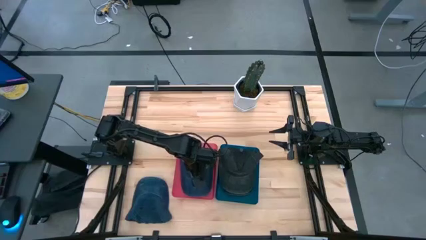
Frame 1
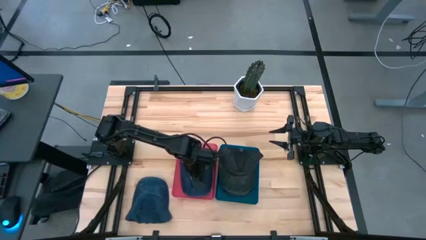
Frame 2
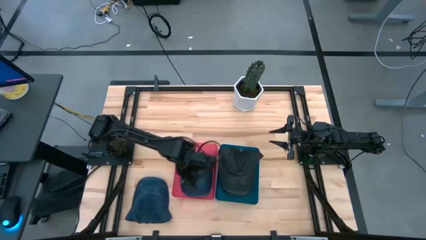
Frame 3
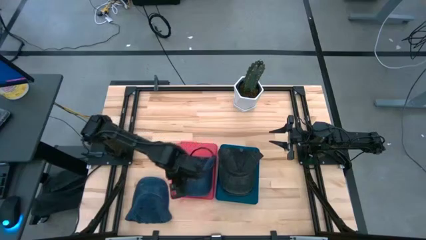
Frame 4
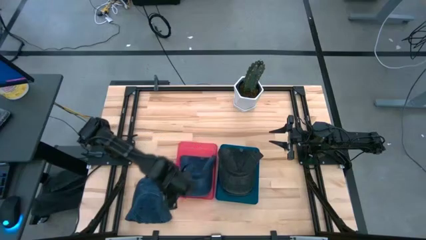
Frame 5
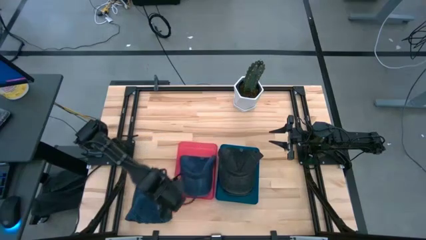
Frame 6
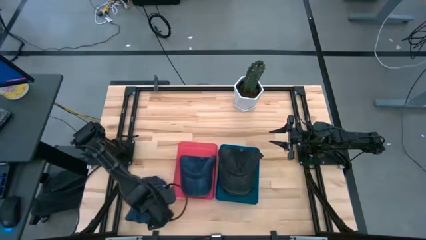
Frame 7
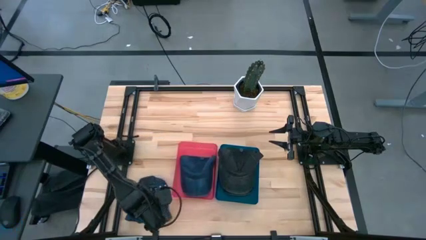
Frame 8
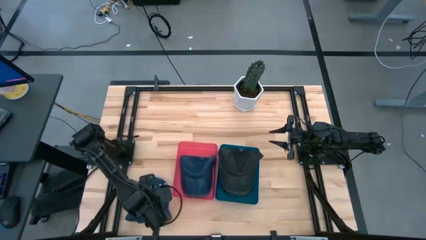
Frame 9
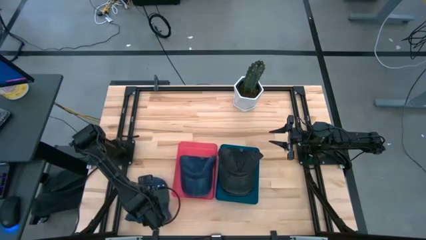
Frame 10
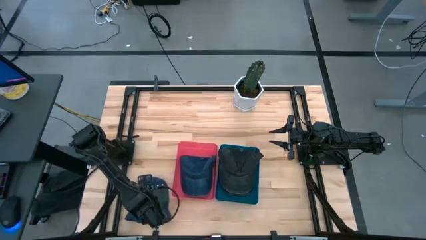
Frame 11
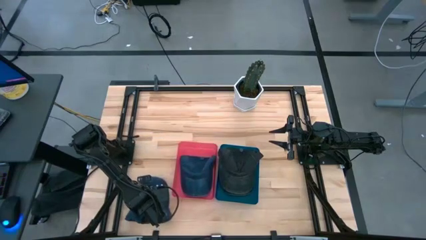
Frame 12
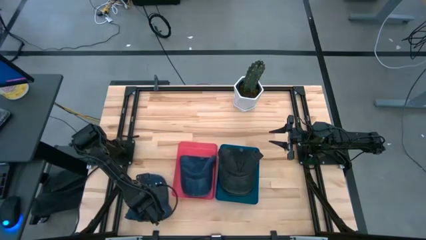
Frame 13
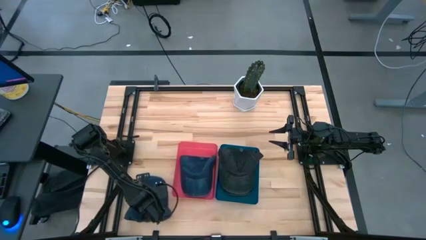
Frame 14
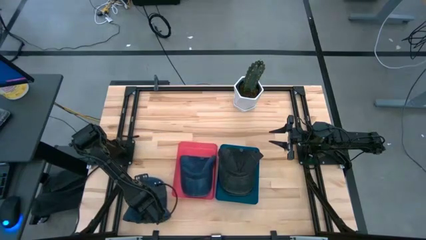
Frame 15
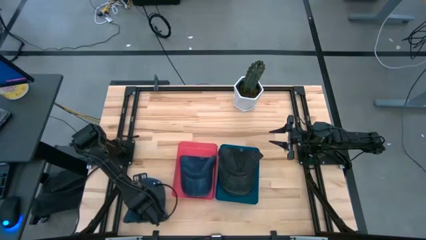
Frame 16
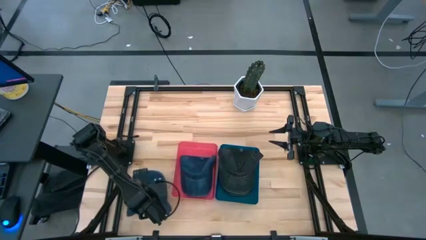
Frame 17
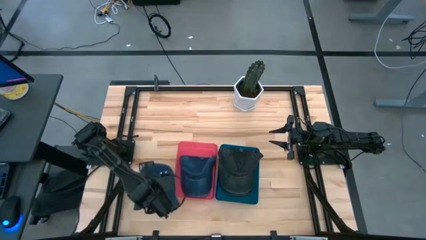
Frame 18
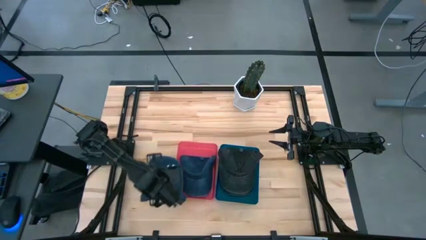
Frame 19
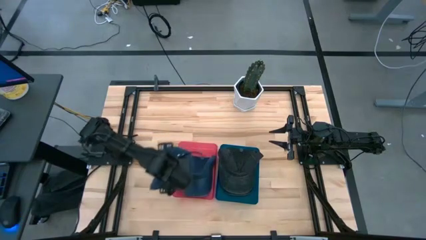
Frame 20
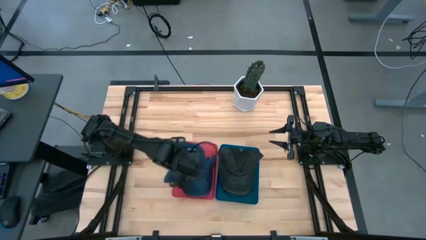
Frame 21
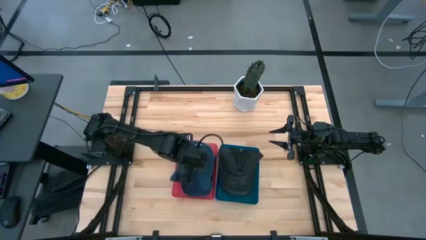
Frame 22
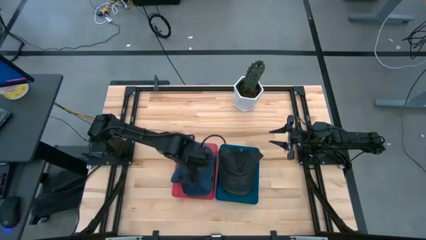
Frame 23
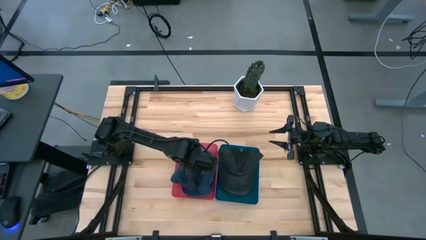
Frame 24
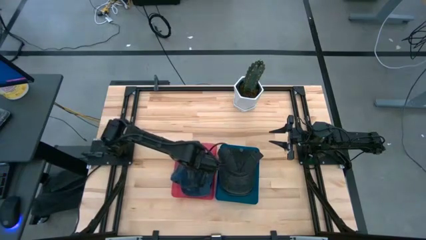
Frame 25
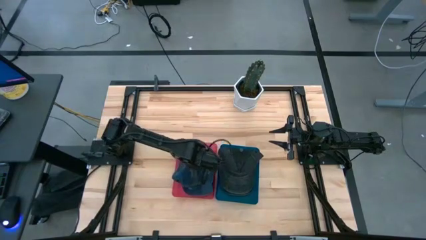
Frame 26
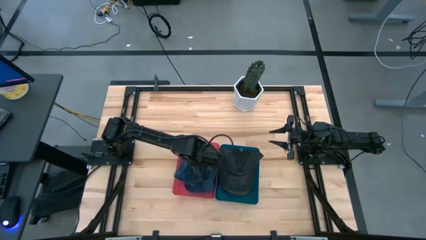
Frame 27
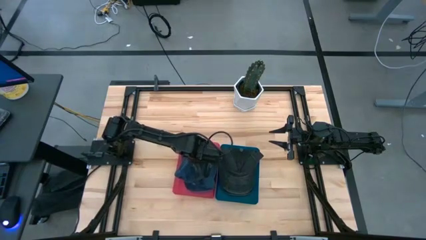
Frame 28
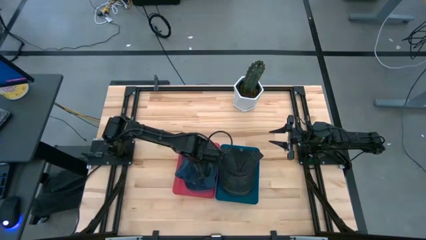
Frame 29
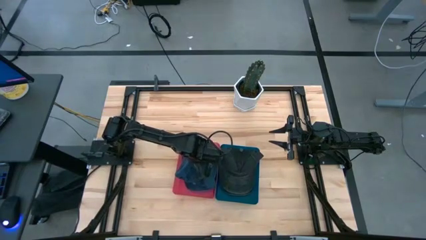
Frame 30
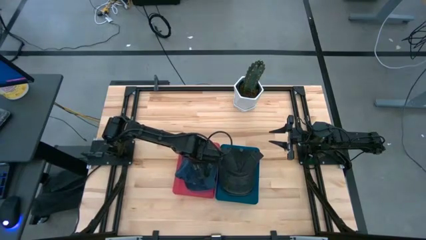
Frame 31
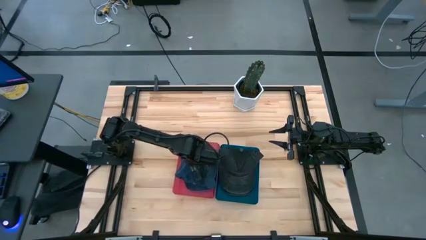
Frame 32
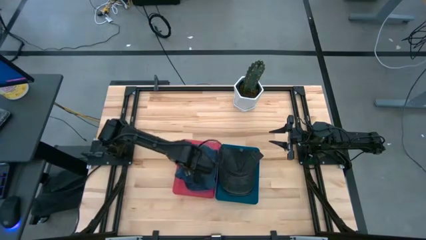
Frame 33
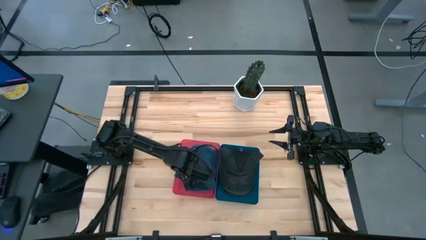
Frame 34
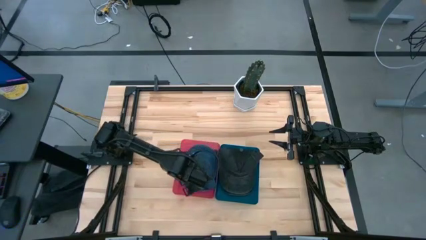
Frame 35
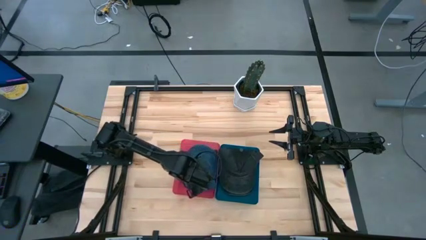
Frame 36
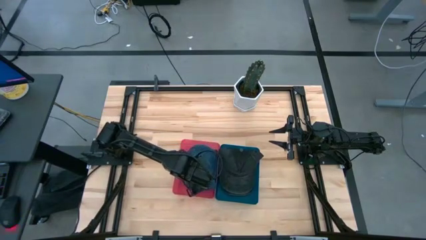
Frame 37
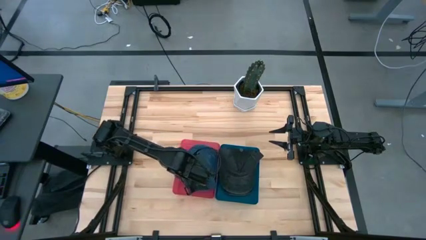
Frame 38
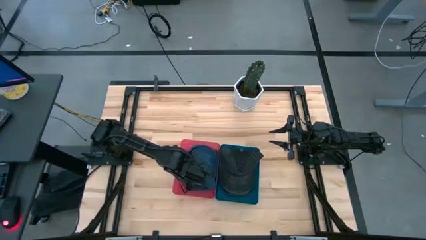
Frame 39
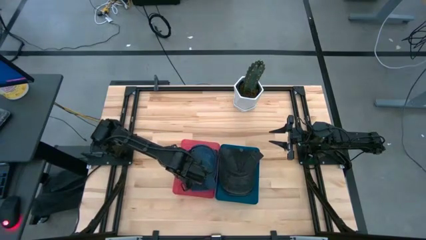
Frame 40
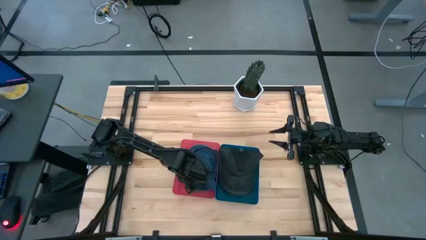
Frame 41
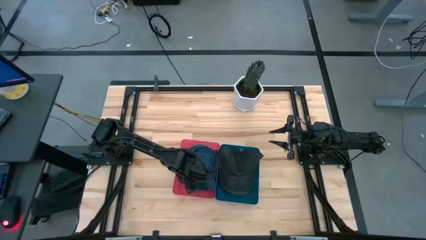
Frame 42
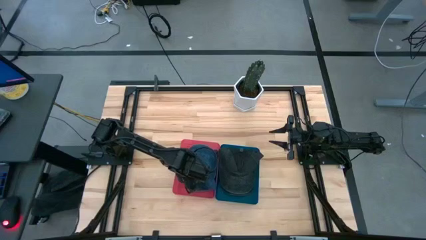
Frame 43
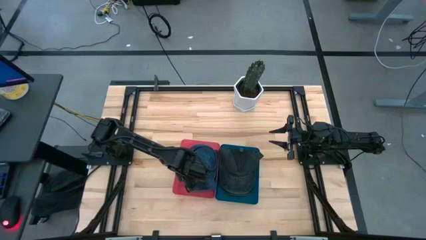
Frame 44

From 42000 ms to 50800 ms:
Task: Pick & Place hat
Put the blue cap into the pink bin

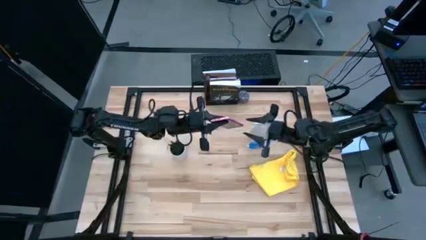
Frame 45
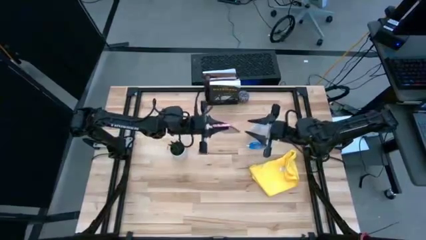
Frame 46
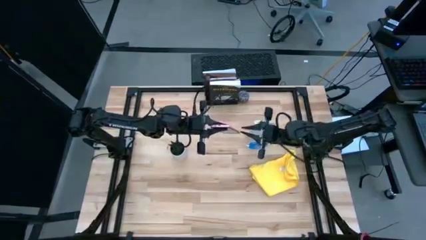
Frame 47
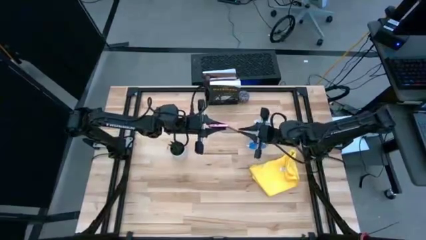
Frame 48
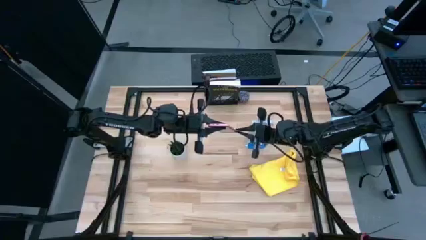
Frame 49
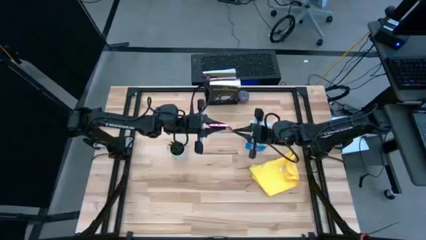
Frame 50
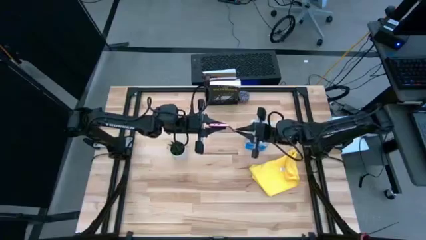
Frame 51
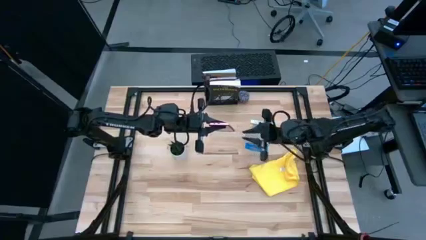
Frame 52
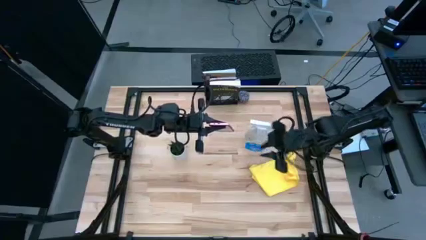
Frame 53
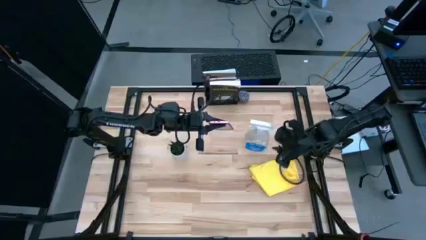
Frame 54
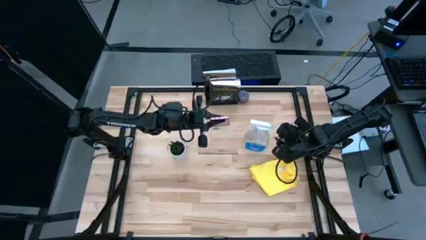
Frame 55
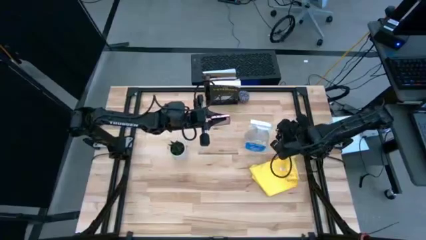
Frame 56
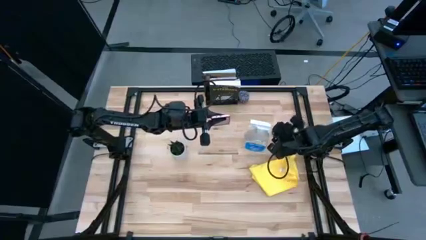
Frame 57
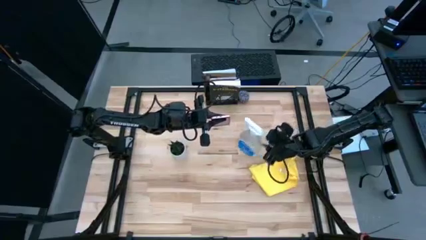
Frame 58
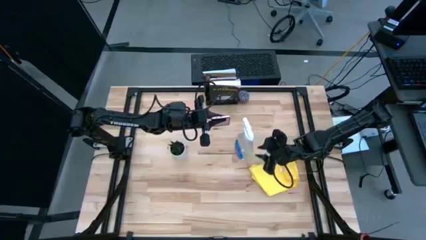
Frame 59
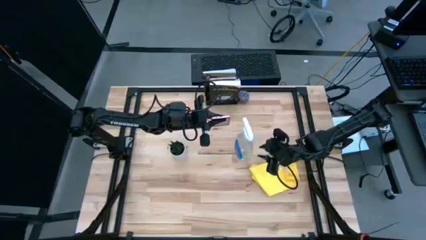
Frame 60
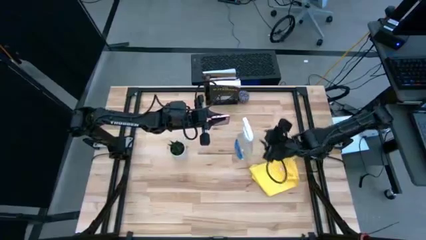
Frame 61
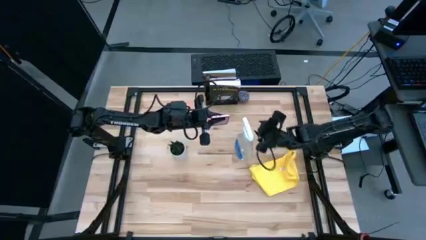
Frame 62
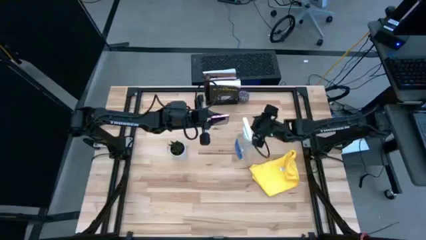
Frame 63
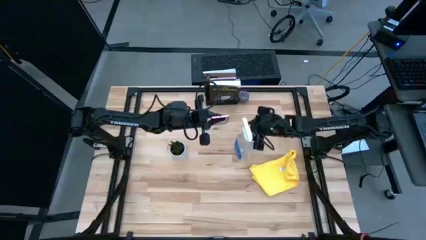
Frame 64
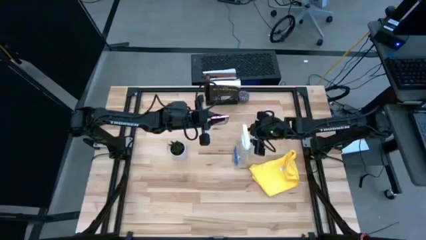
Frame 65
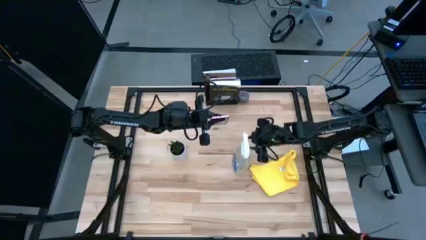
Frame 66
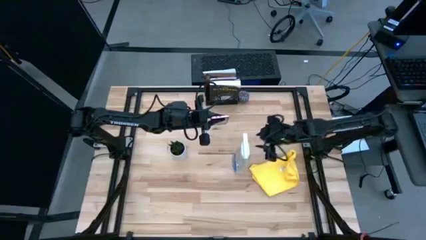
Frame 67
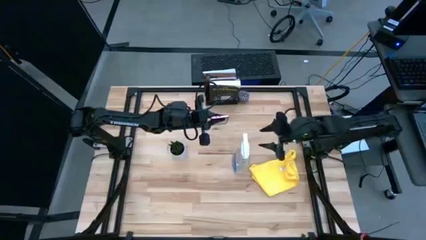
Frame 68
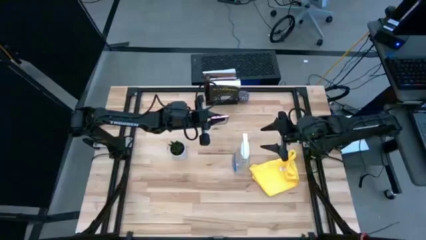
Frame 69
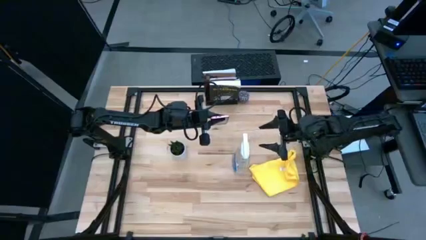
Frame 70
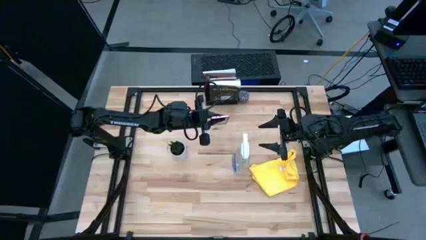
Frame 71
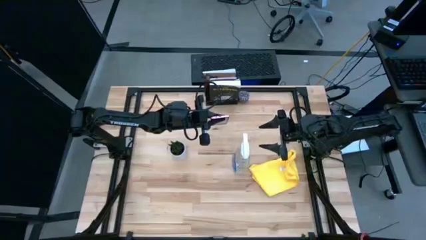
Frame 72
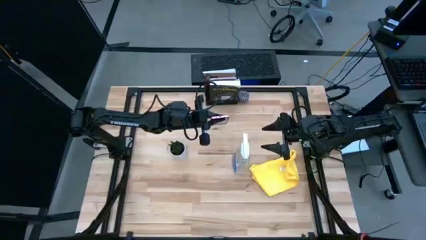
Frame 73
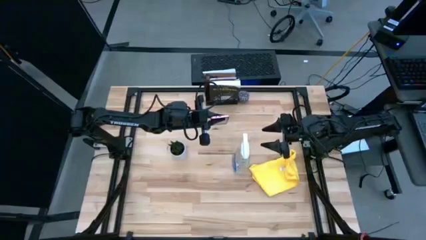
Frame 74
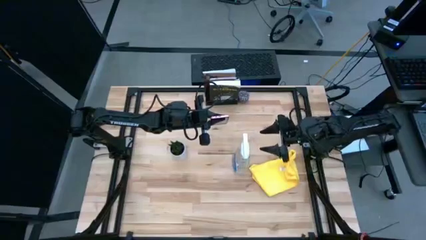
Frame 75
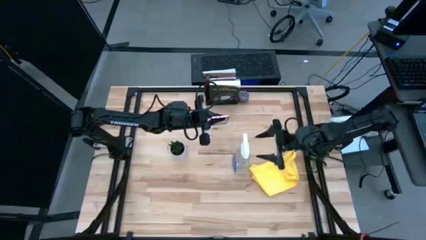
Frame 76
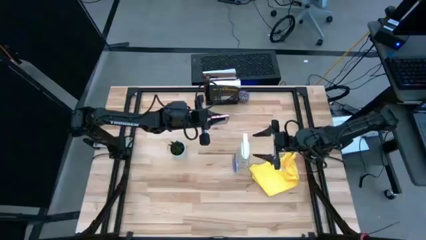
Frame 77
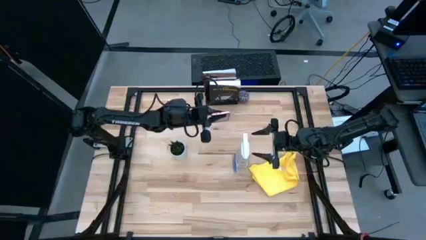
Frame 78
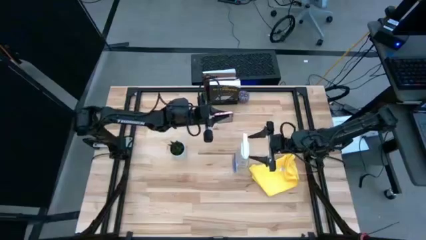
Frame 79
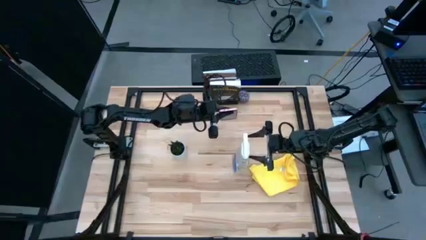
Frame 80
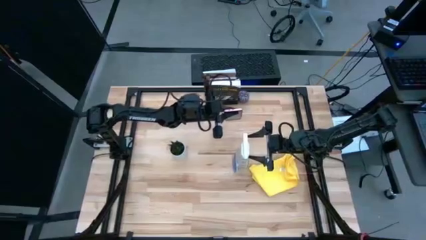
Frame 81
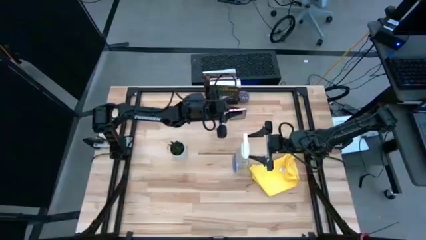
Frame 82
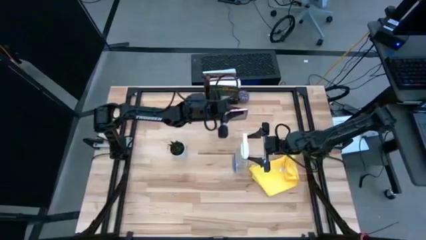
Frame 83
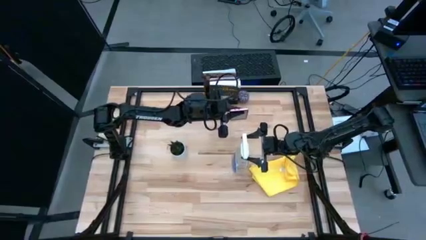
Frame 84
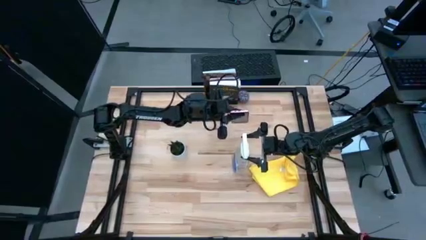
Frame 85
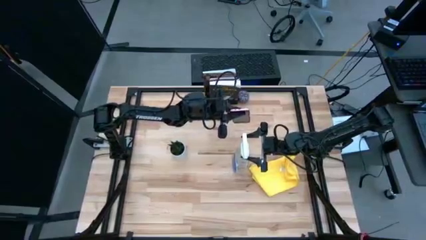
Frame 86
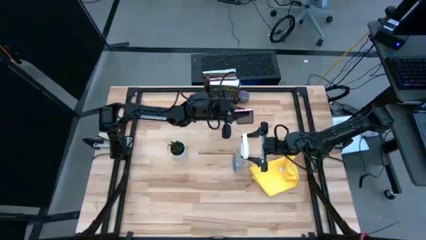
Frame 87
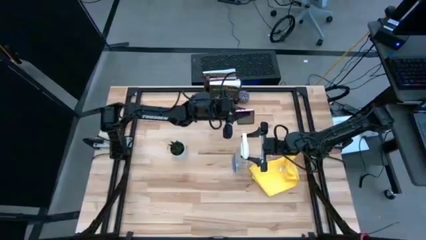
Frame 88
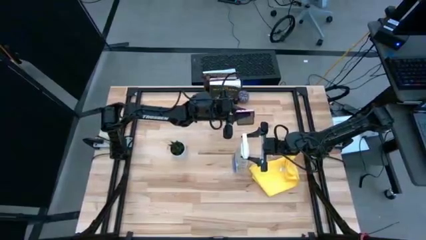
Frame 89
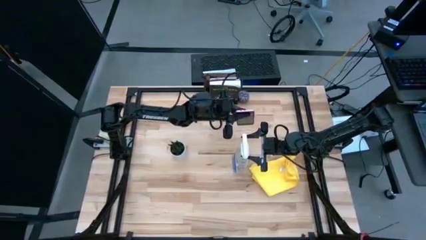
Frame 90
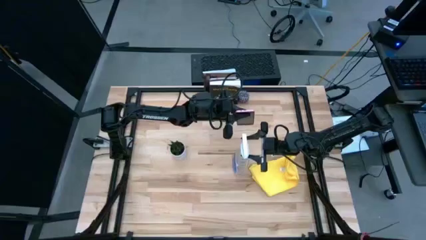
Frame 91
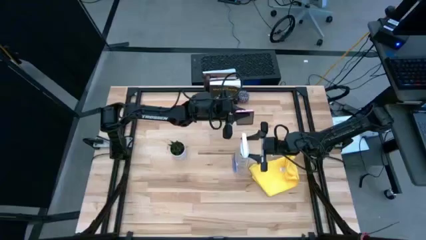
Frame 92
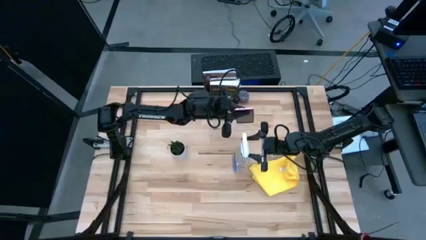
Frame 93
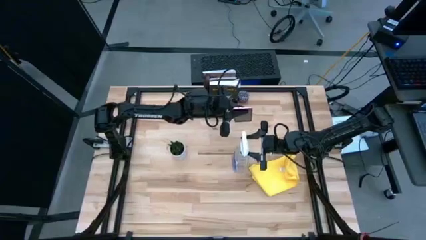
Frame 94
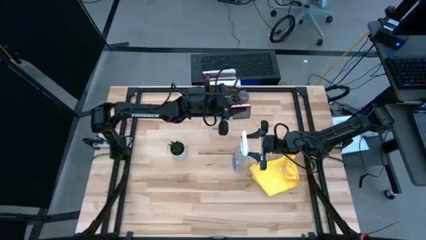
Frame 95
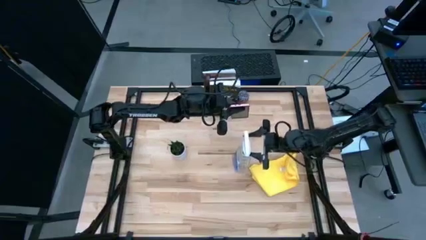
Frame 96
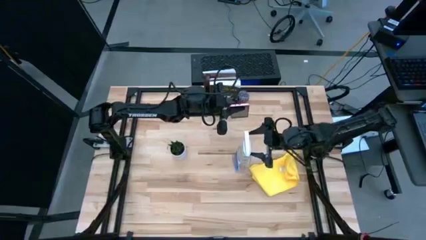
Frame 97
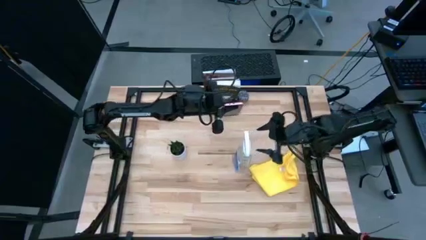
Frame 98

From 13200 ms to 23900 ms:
Task: Apply microfiber cloth
Spray the front of the cellphone using the spray bottle
